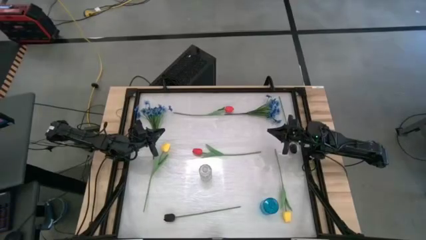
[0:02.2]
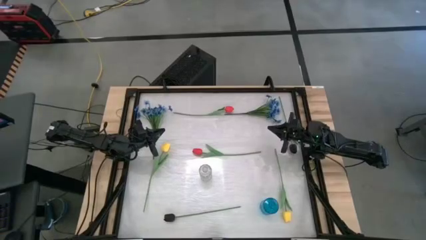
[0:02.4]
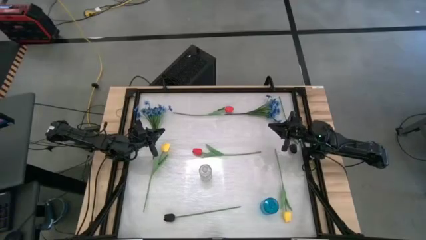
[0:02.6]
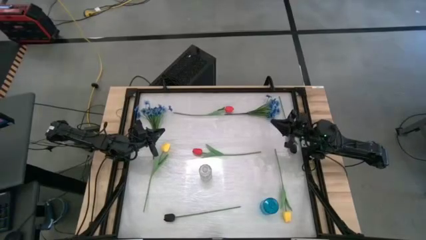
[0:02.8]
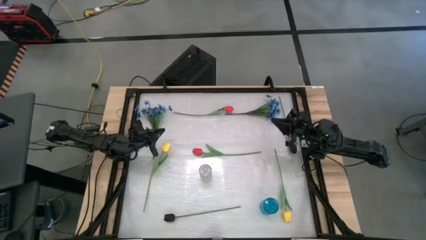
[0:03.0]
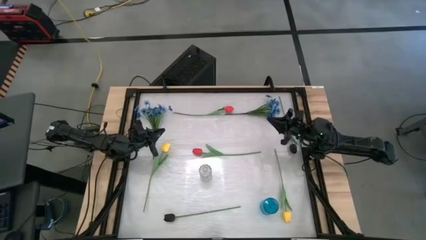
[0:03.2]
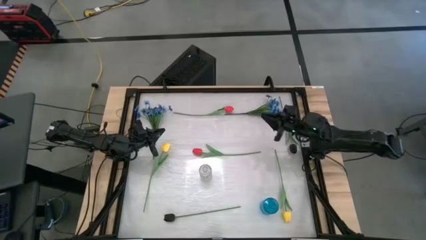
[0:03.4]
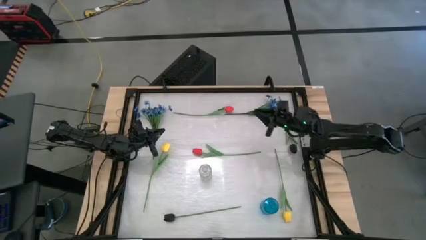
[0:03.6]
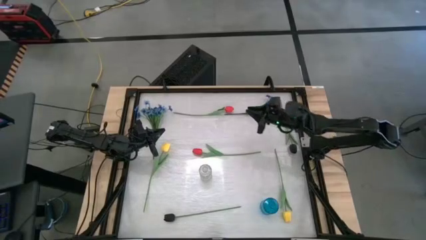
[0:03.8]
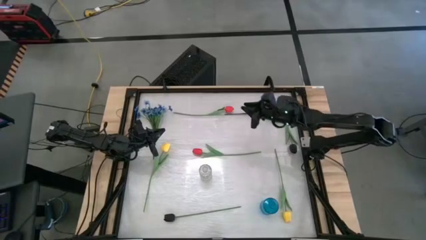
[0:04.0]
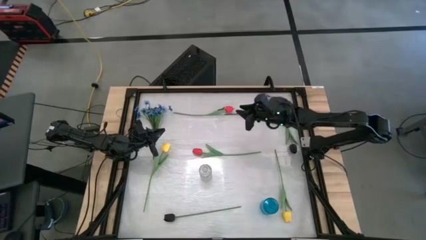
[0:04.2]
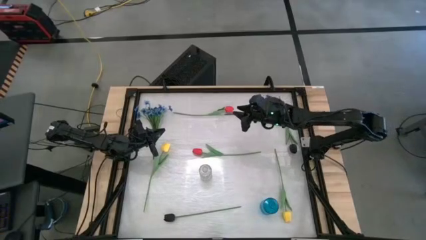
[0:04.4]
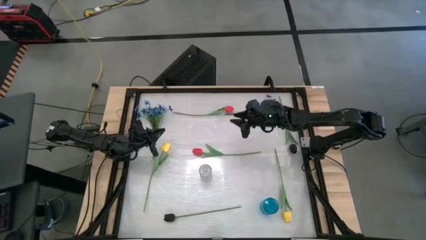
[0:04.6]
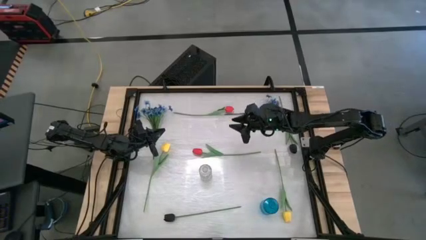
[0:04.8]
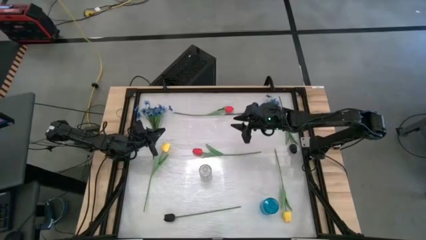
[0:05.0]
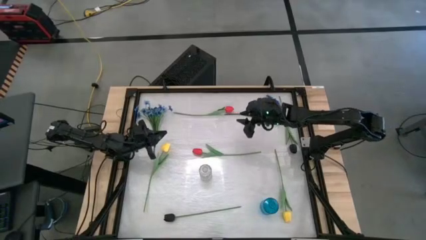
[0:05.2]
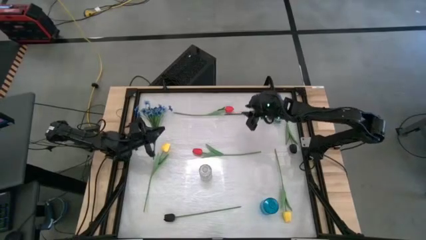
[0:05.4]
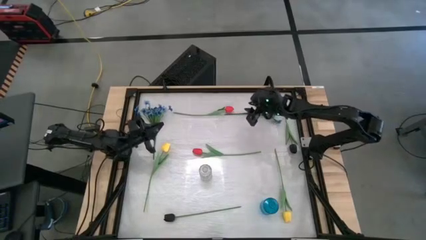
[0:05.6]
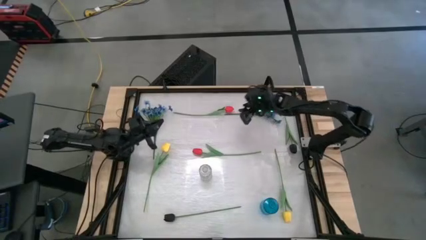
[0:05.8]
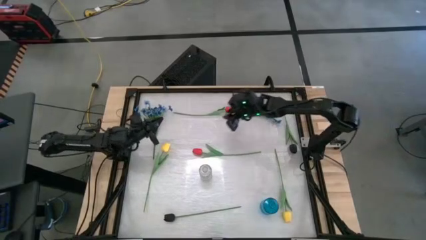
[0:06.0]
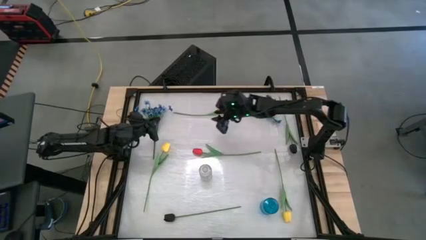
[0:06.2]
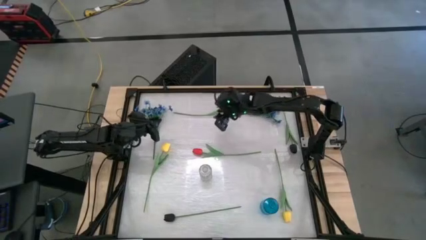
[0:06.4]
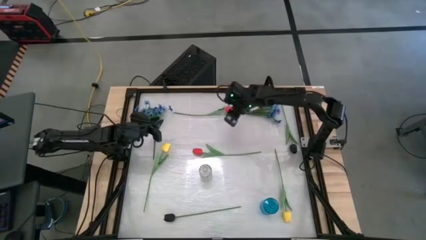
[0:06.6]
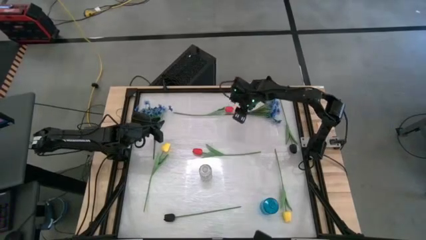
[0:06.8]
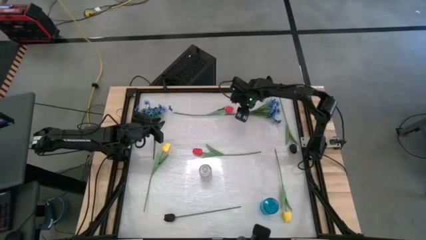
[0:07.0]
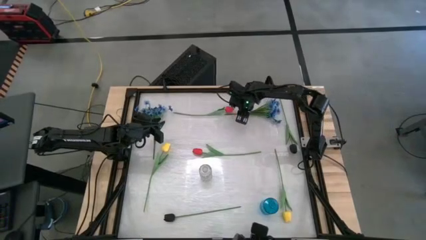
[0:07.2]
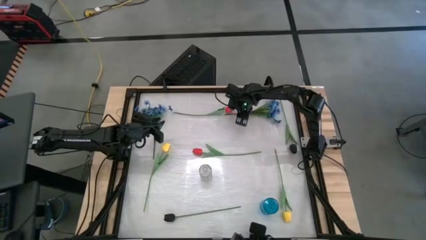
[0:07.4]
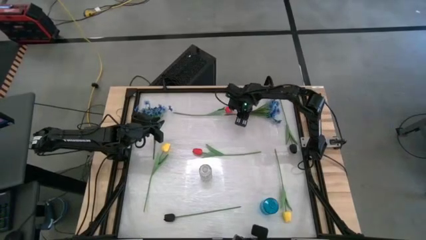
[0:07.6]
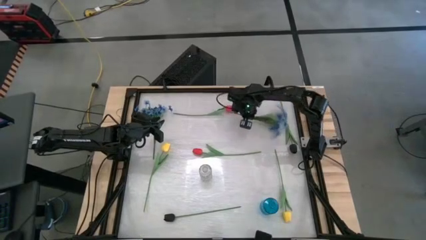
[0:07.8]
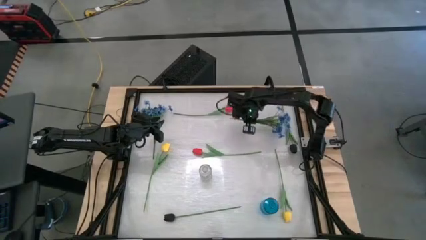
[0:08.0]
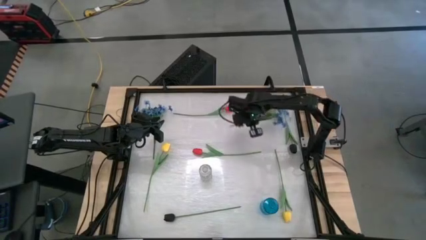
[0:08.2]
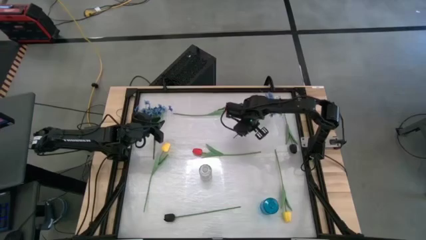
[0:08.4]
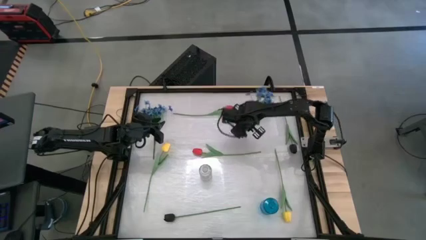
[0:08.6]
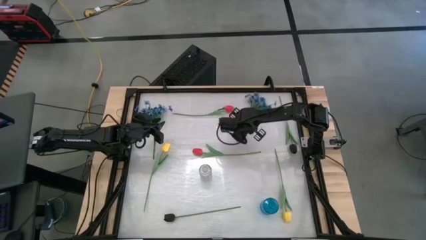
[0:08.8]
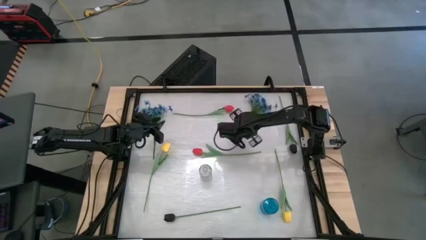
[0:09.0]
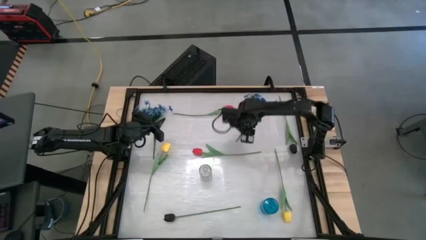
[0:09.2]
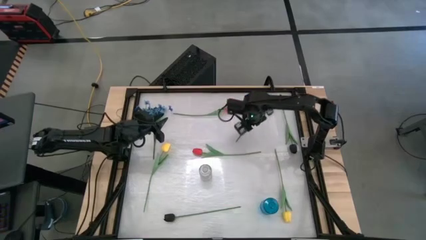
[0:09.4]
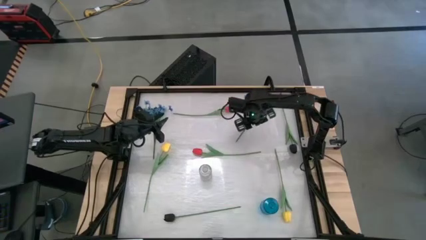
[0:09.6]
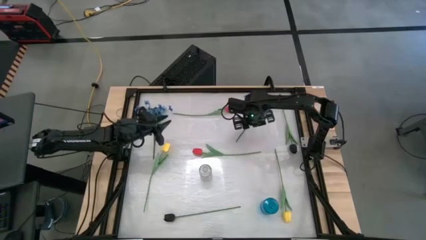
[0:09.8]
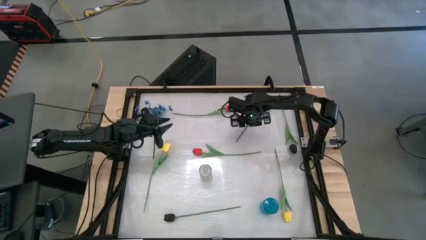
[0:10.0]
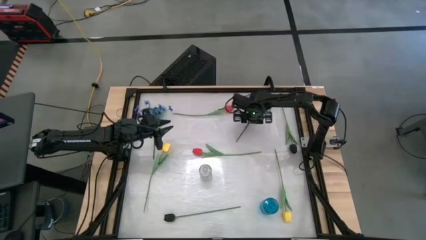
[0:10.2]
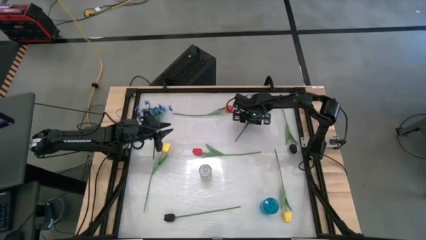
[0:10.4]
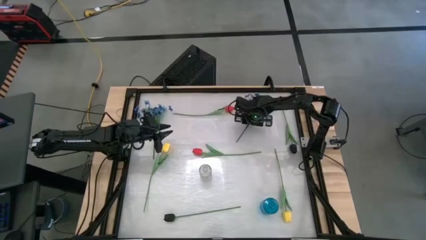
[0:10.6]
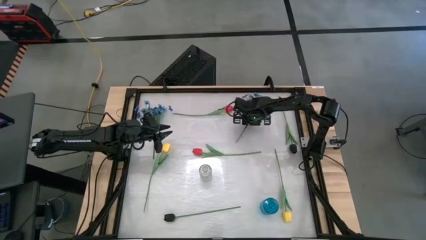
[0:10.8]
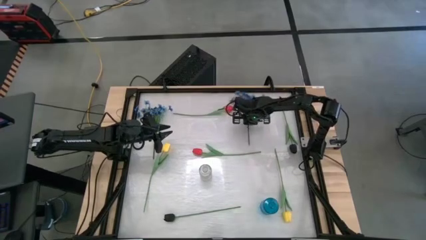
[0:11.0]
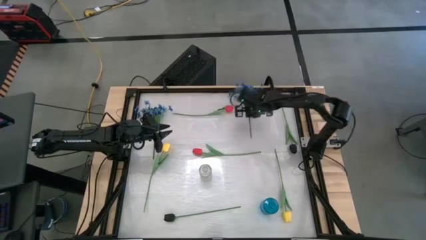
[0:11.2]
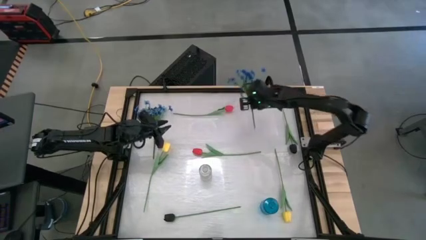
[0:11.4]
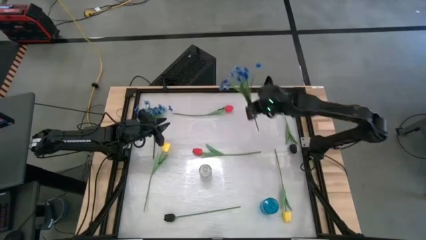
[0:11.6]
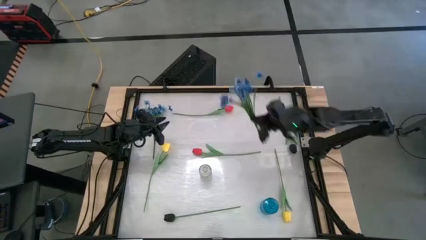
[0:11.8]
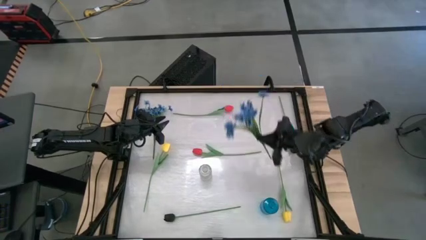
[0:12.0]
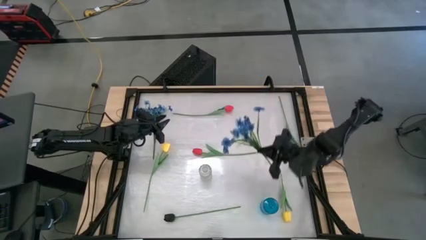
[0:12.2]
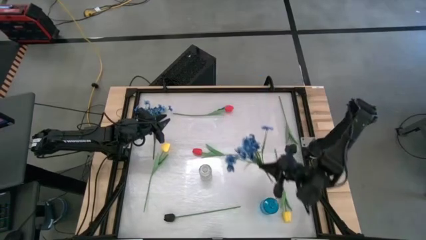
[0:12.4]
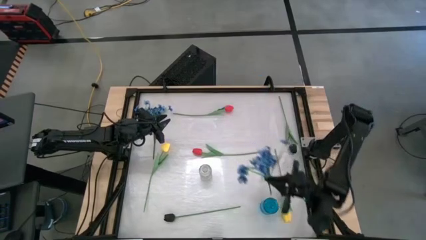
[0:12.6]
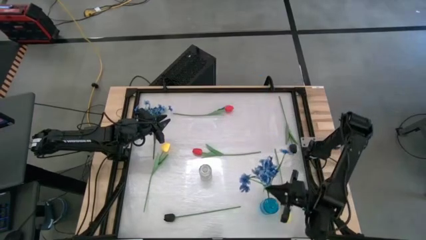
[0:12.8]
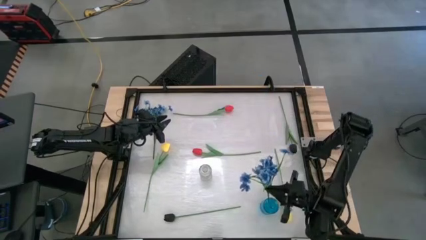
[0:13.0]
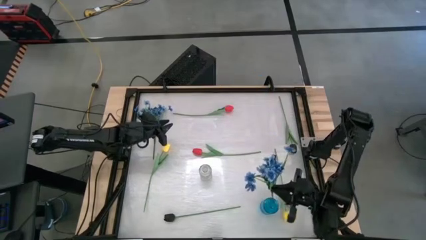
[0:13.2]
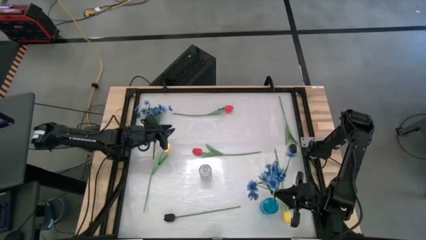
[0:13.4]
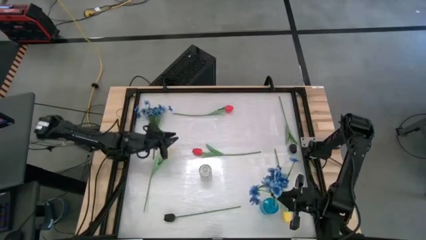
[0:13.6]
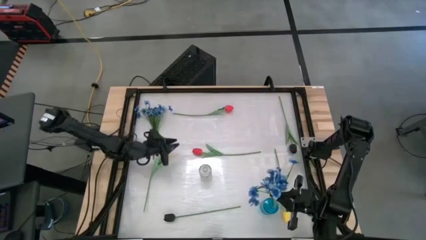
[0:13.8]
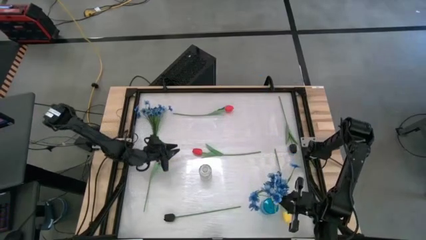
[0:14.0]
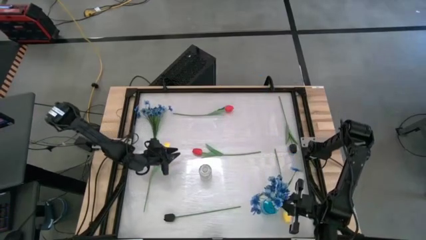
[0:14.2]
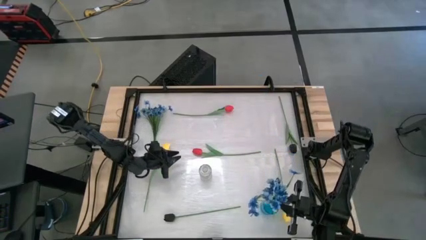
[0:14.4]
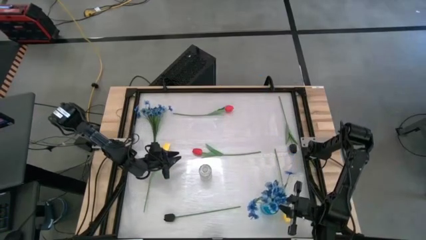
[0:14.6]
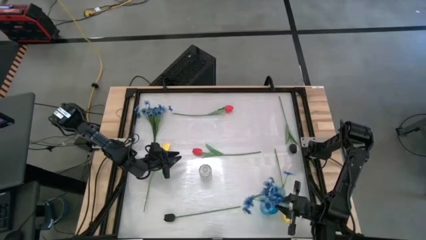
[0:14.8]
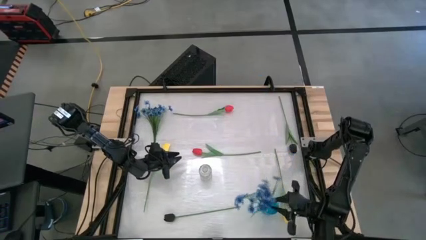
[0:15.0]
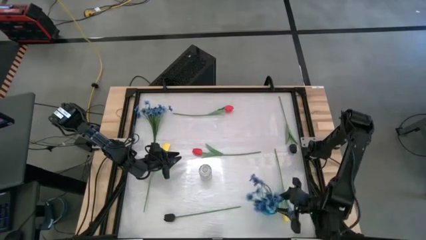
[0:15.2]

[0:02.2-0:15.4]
Task: Sort flowers into vase by color
Put the right blue flowers into the blue vase

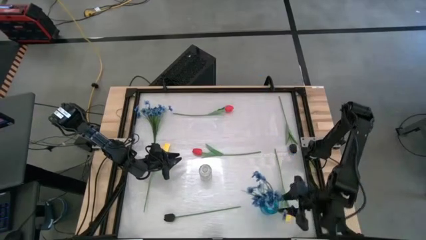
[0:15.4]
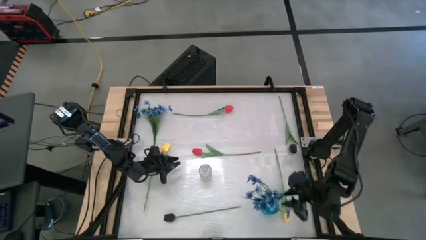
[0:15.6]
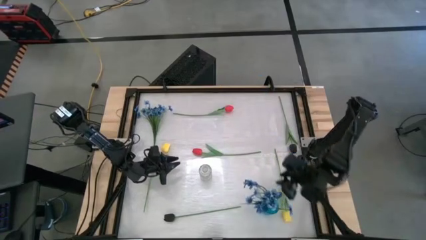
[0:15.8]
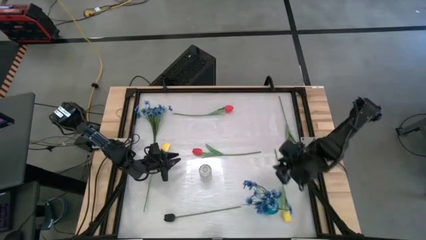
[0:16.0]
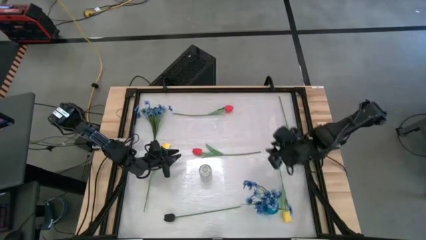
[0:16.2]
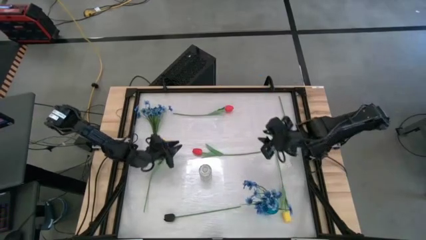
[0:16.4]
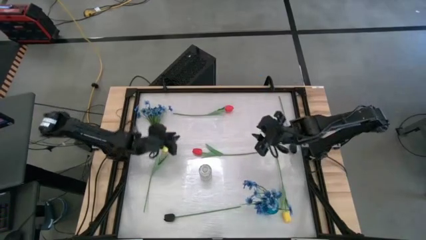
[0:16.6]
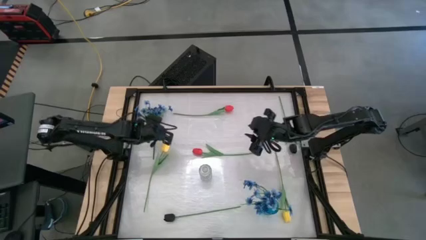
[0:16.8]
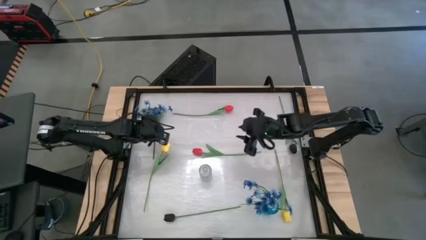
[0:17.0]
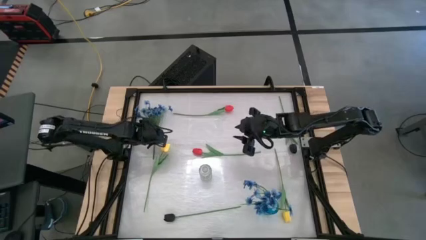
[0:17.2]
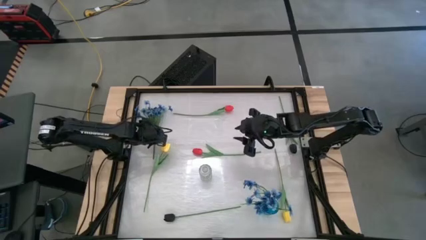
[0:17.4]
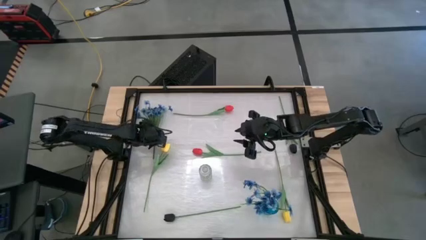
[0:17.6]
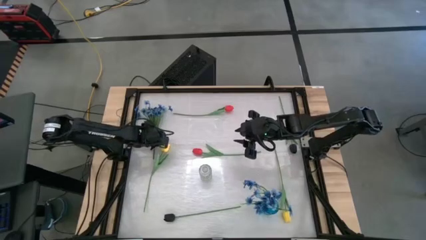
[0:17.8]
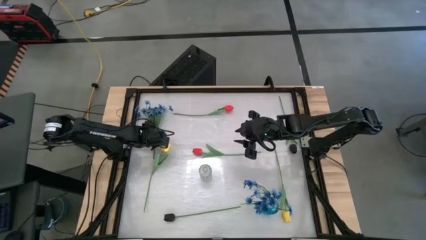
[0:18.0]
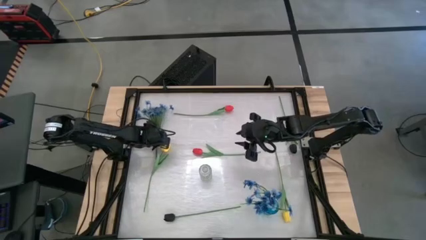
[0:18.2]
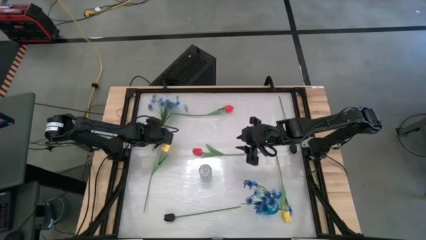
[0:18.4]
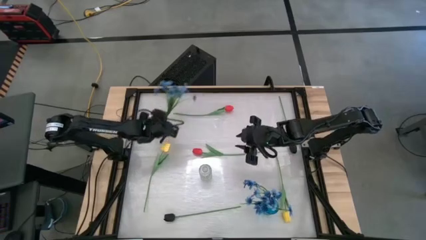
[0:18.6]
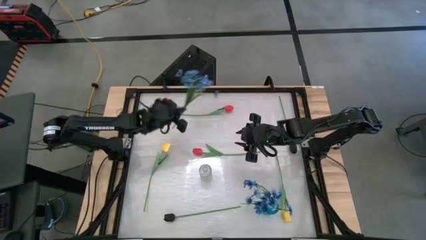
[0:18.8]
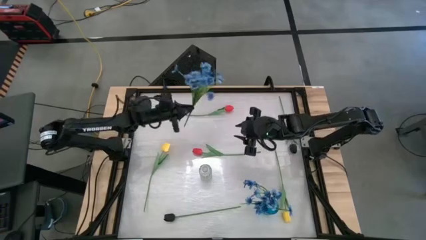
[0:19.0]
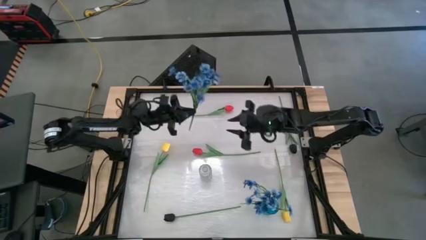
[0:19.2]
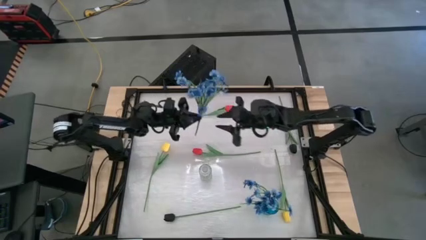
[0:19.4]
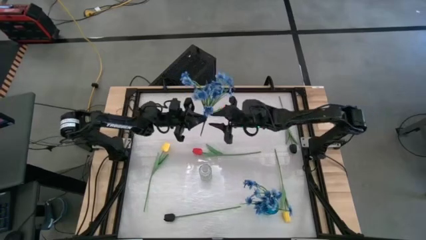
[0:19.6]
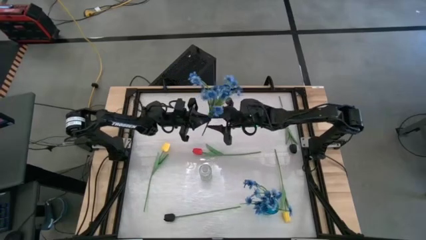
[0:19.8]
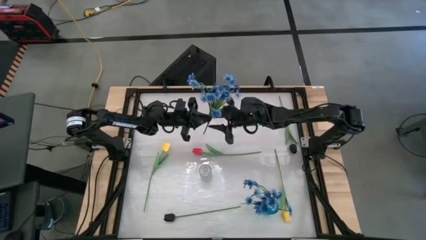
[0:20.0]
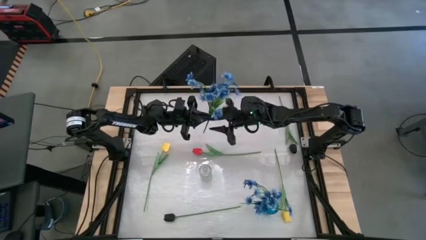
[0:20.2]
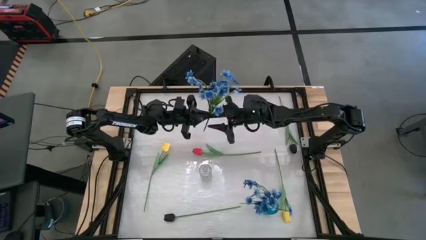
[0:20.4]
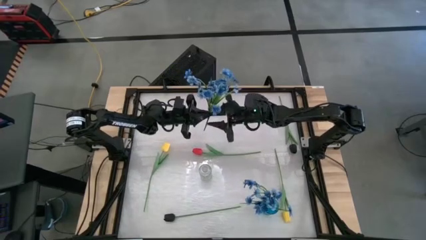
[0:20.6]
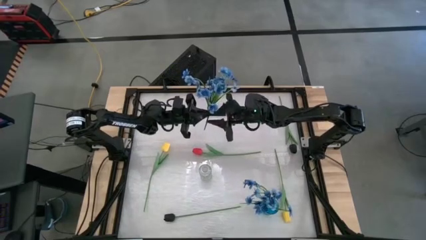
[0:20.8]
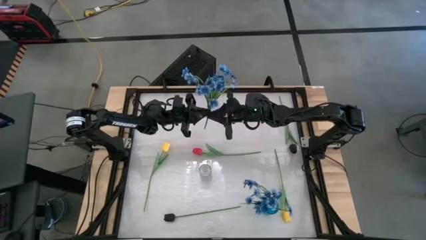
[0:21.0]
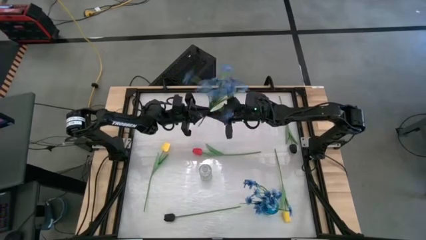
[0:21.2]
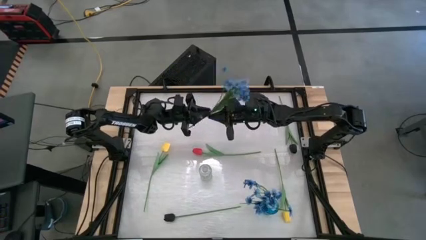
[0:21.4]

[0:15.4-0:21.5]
Put the blue flowers into the blue vase
